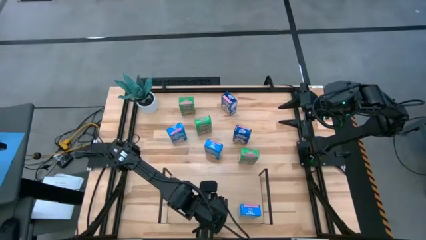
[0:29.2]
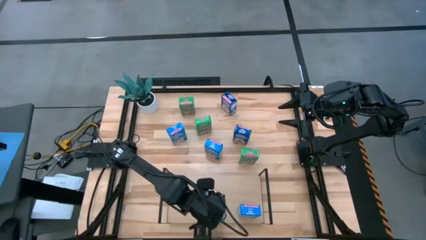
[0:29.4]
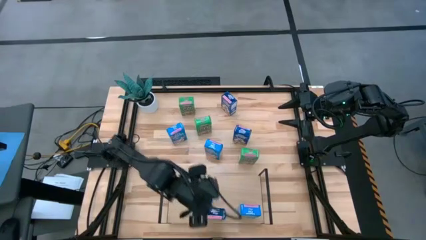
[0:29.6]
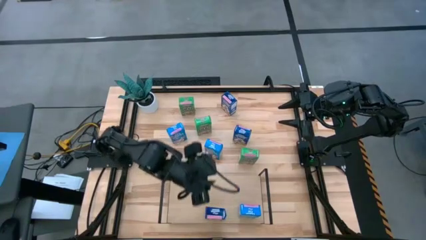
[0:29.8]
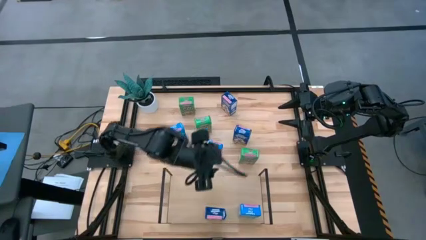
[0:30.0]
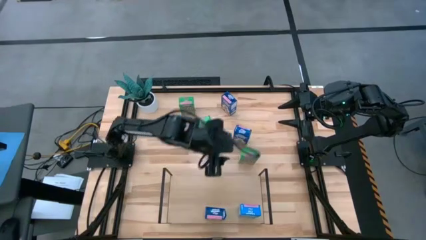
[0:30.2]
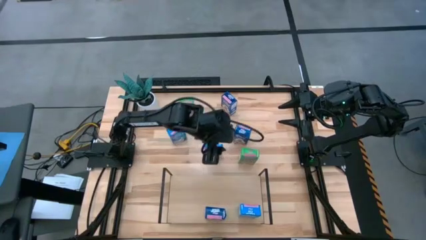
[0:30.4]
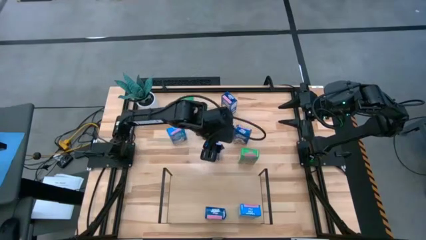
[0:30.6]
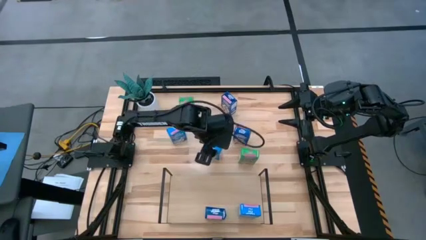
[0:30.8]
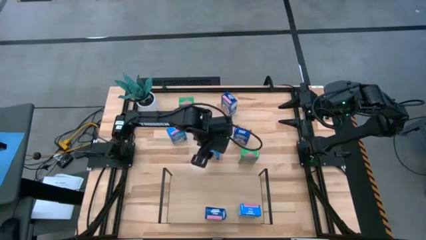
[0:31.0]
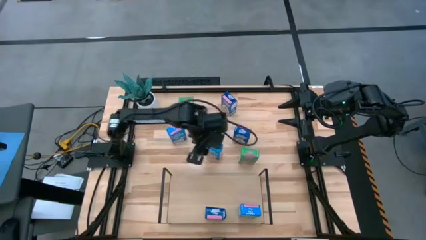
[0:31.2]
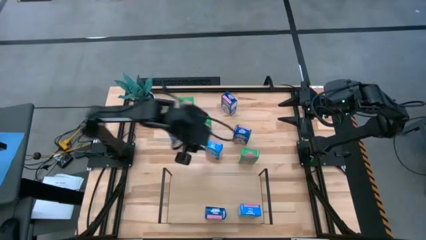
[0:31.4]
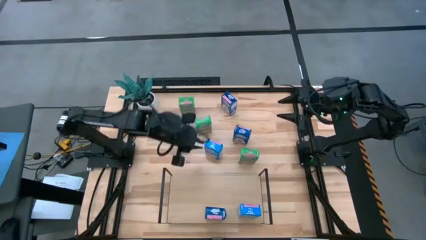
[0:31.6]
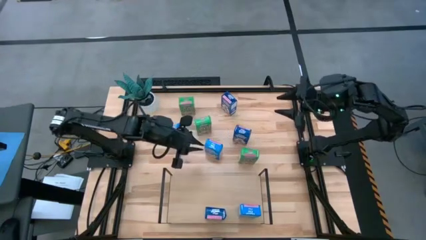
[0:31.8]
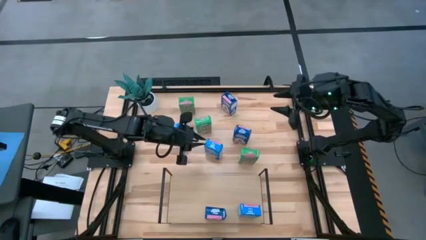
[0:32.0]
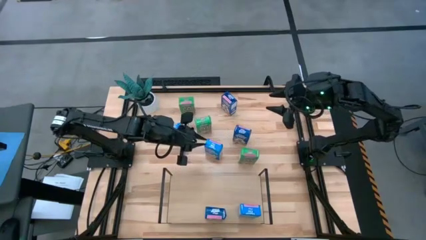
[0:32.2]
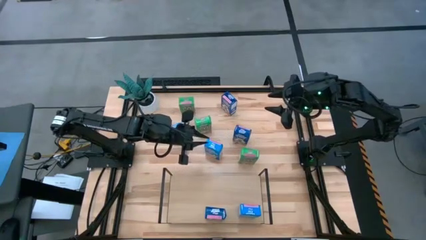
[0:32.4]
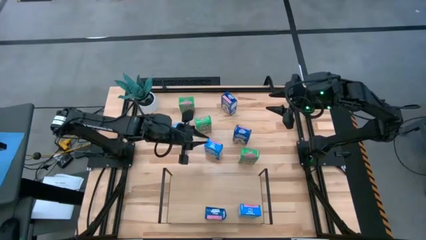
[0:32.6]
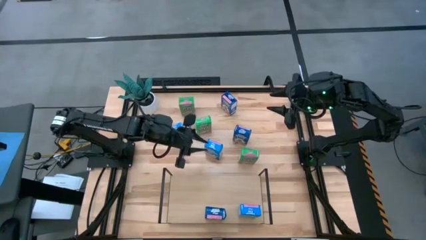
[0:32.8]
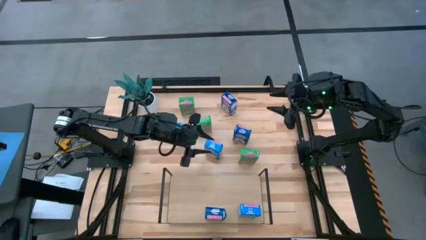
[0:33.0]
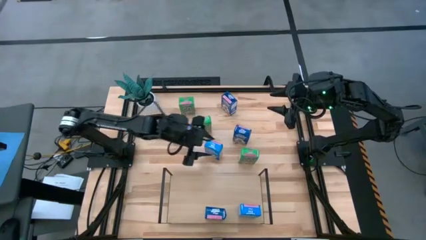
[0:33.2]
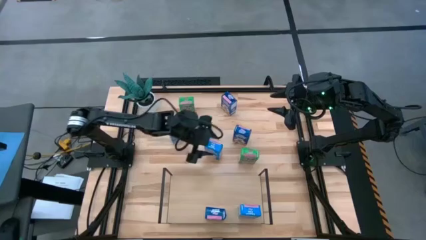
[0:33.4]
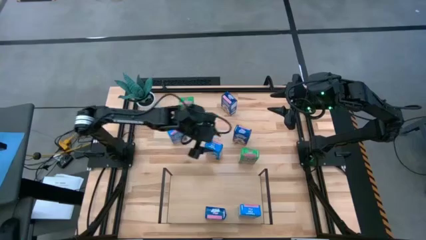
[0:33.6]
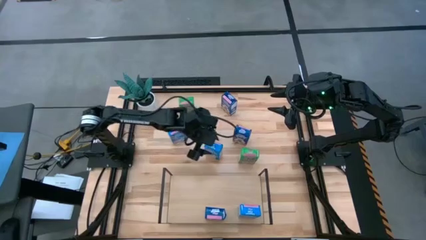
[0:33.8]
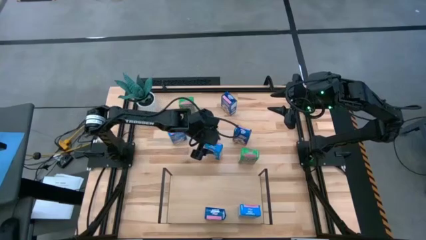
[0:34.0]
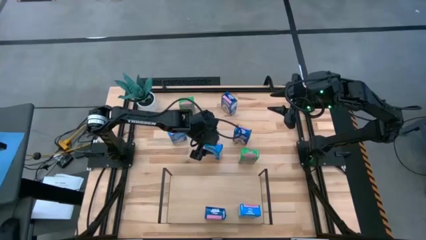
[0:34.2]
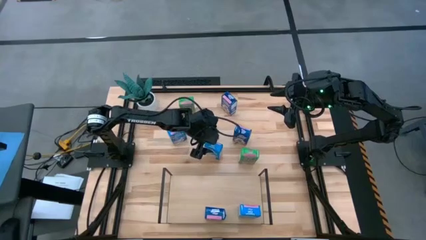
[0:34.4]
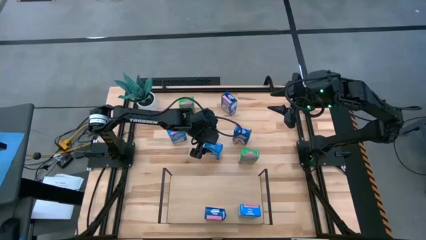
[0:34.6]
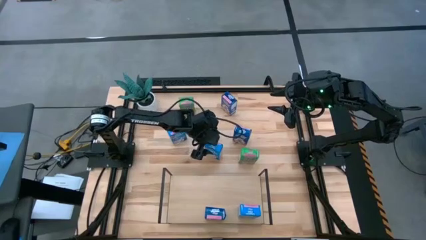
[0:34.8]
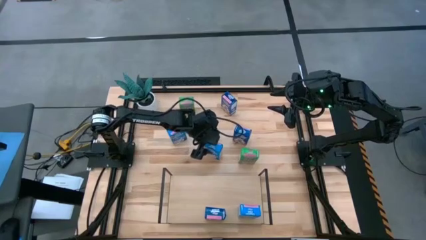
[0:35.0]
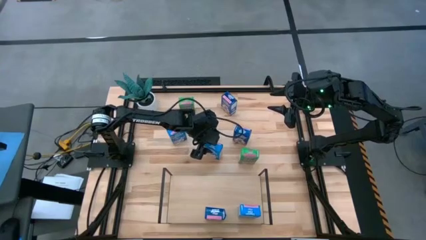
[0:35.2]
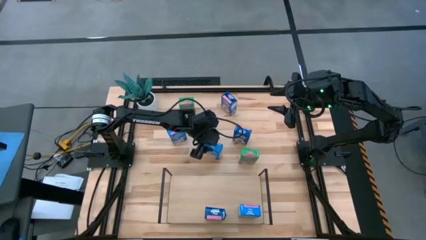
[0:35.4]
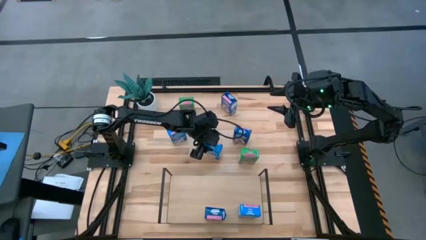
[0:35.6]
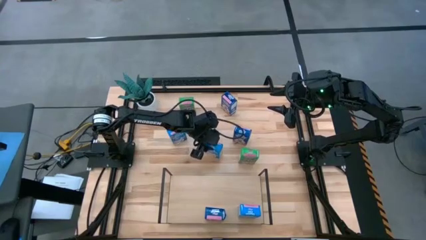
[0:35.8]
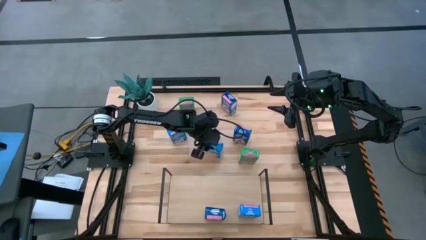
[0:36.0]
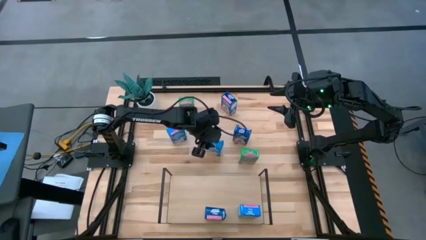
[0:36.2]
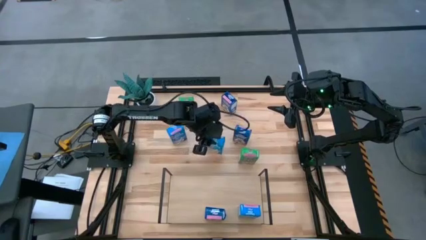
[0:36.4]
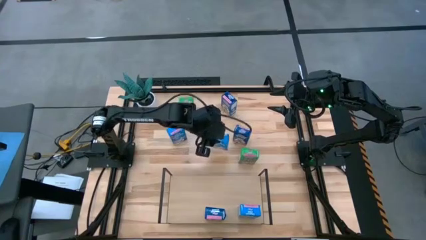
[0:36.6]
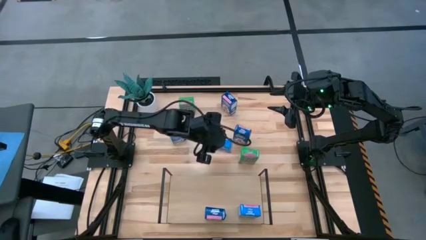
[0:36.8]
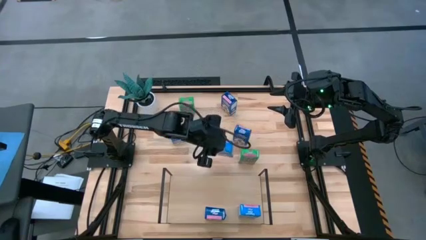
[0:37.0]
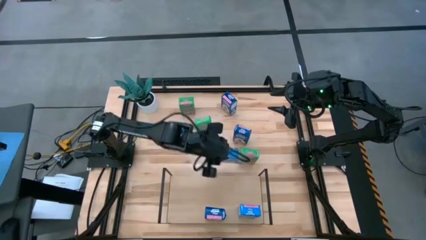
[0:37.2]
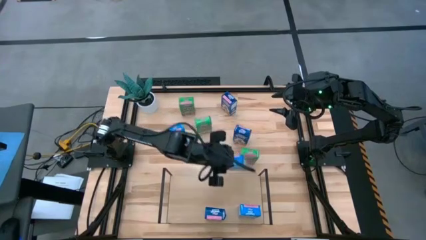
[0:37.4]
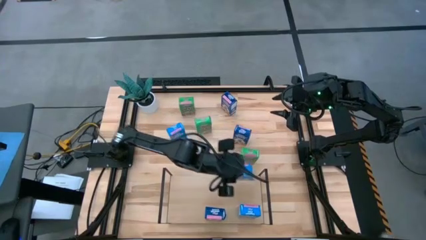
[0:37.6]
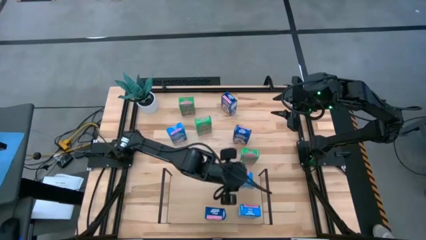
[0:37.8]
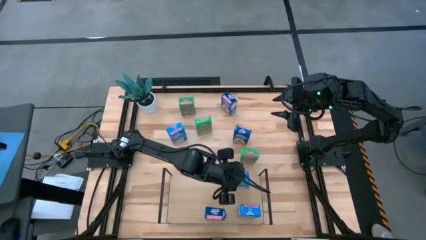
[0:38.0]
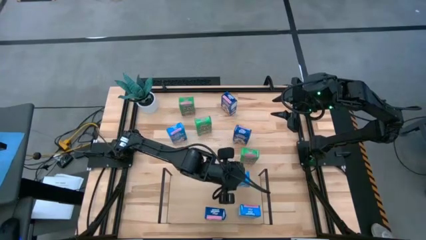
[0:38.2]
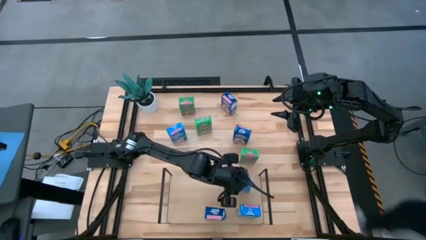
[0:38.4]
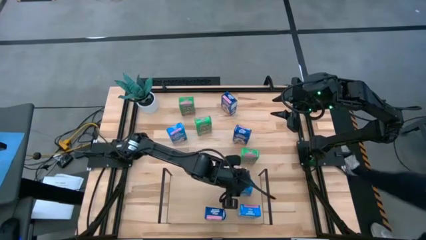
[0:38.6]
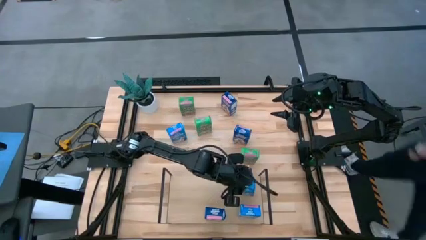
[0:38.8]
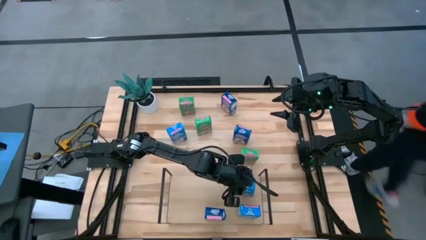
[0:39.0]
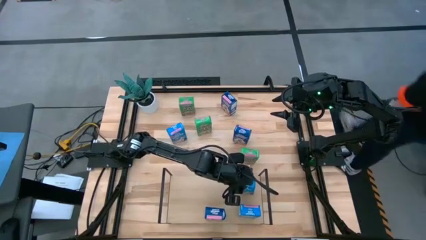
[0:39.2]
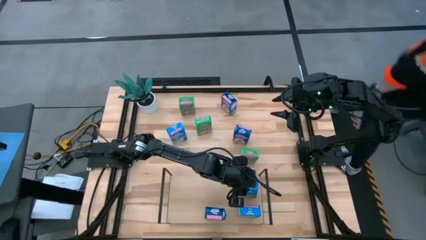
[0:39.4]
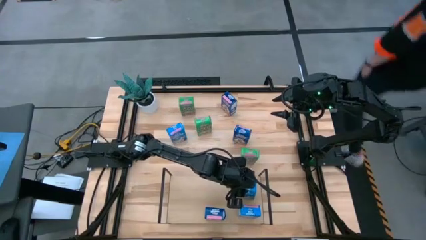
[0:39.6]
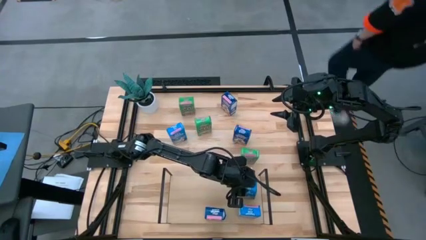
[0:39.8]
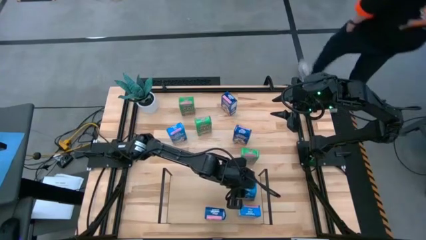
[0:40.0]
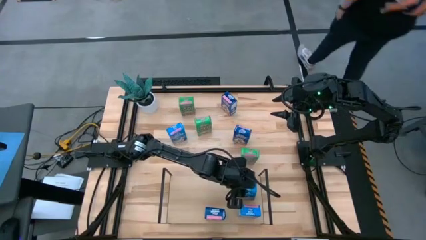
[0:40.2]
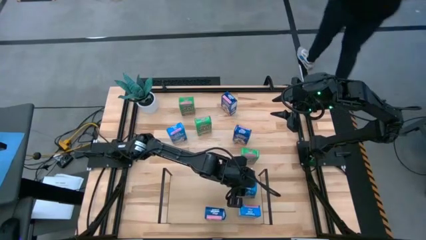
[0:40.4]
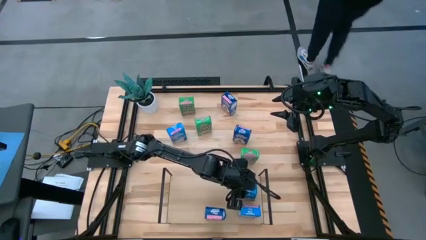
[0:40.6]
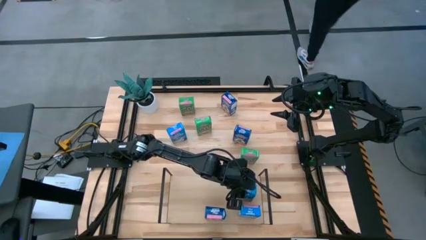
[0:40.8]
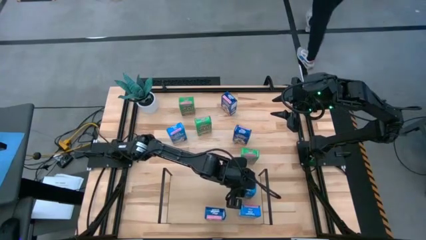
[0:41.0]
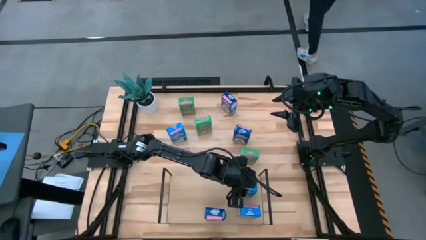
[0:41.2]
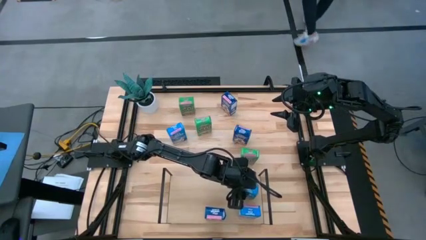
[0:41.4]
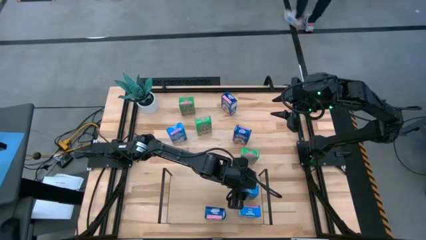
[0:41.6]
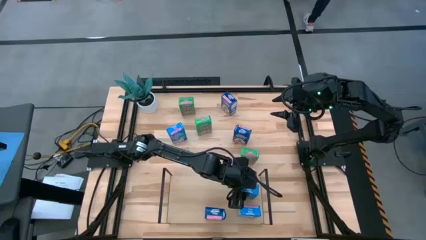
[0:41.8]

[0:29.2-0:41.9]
Task: Stack cereal on shelf
Put the bottom light blue cereal box on the shelf aligned with the other light blue cereal box
